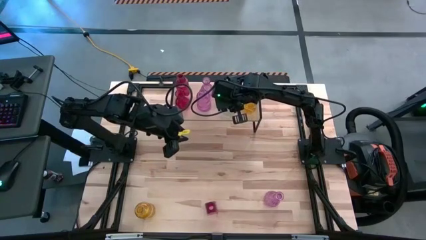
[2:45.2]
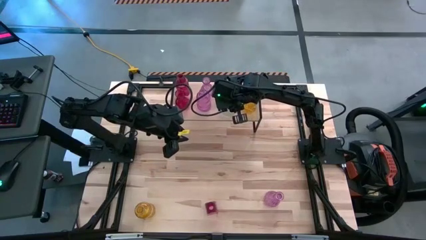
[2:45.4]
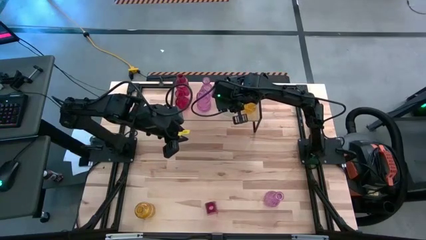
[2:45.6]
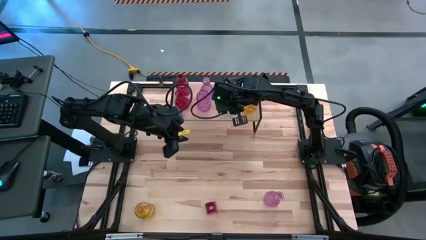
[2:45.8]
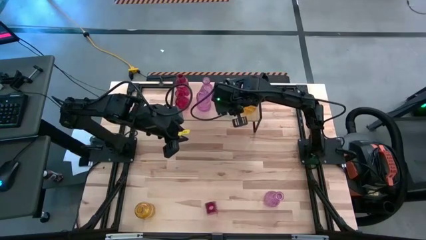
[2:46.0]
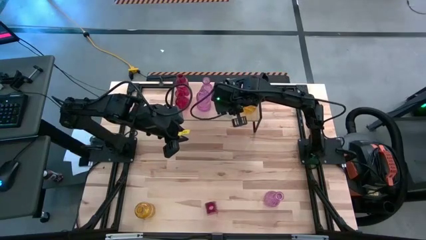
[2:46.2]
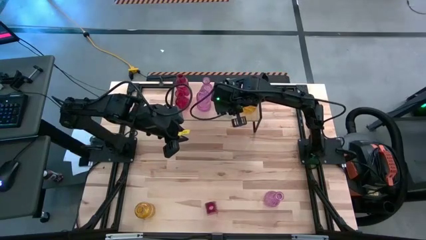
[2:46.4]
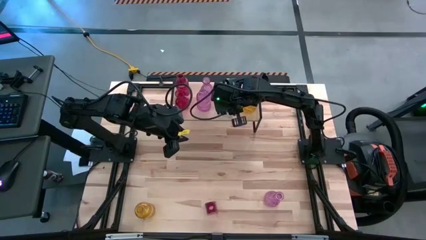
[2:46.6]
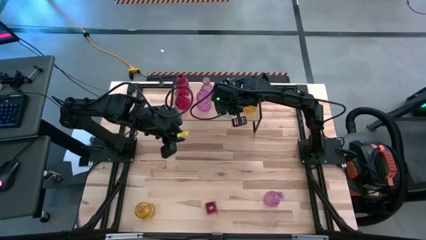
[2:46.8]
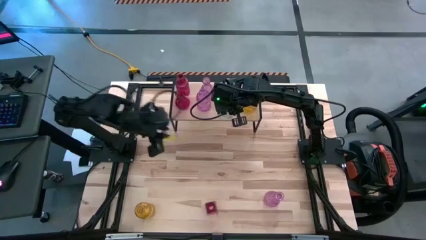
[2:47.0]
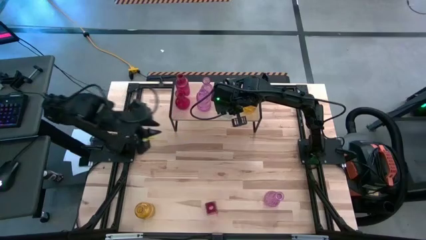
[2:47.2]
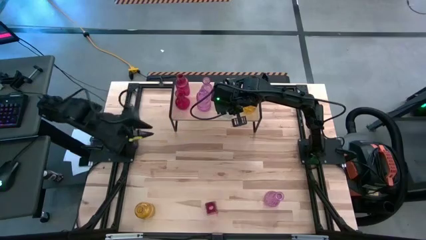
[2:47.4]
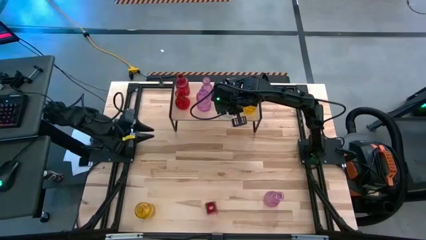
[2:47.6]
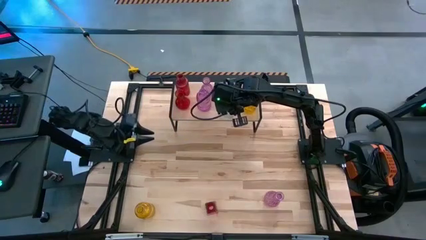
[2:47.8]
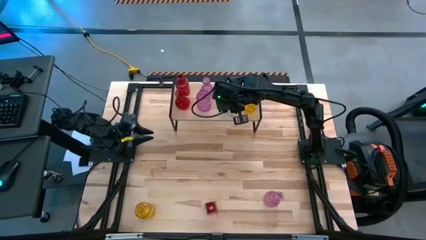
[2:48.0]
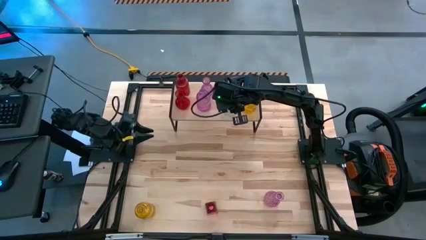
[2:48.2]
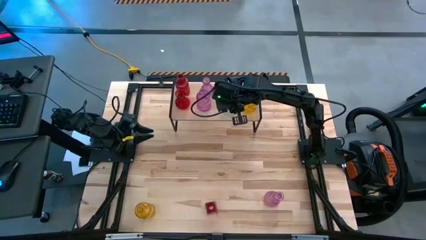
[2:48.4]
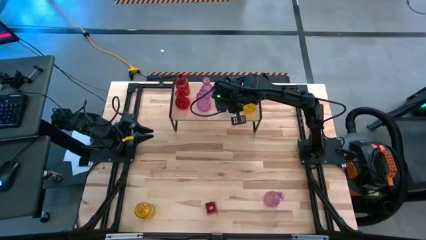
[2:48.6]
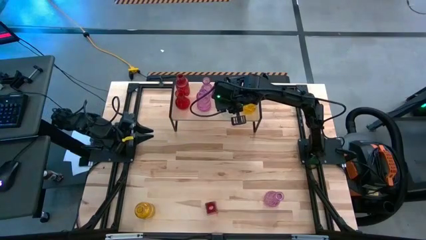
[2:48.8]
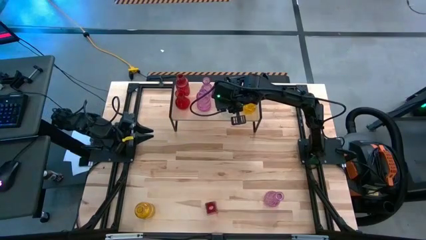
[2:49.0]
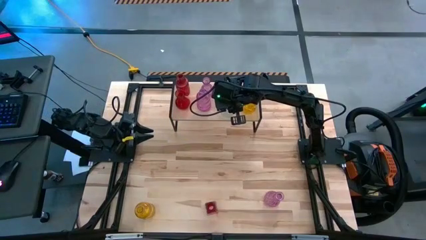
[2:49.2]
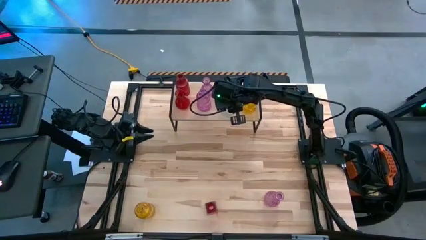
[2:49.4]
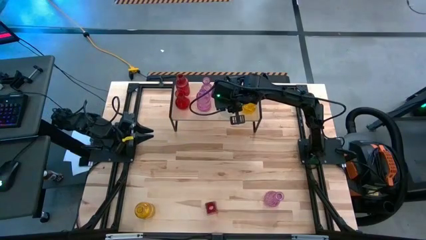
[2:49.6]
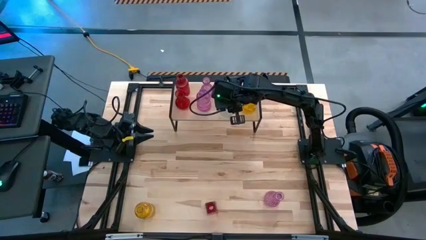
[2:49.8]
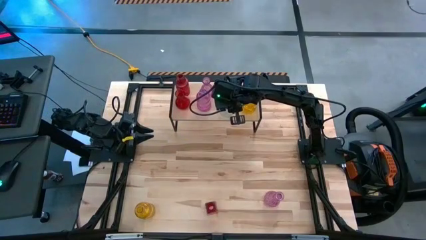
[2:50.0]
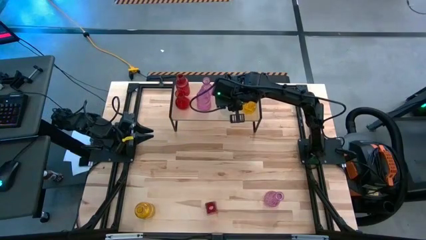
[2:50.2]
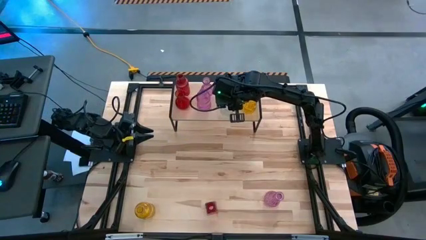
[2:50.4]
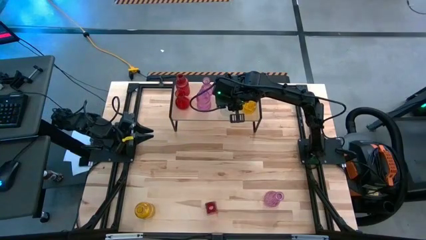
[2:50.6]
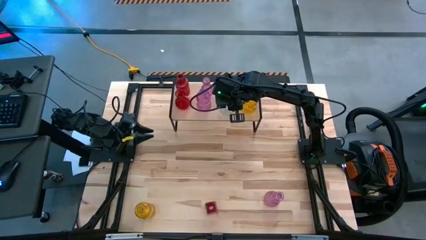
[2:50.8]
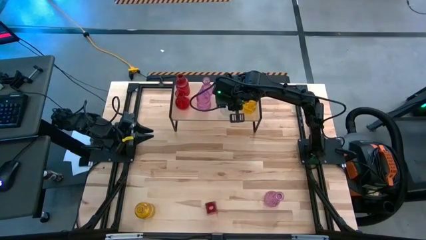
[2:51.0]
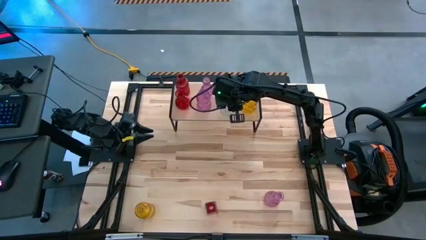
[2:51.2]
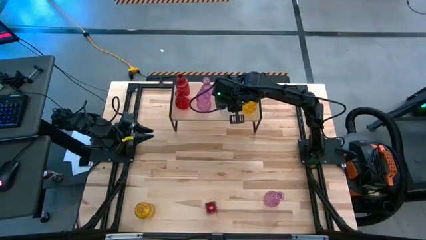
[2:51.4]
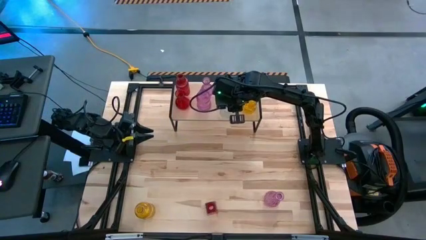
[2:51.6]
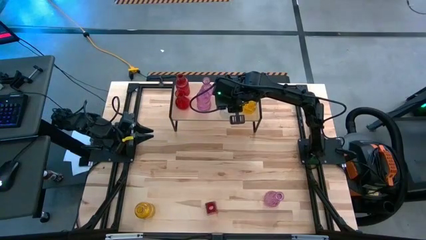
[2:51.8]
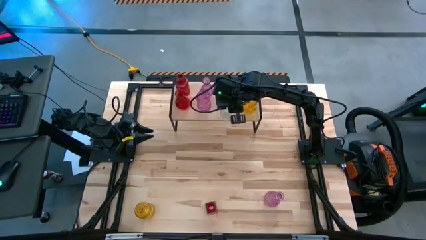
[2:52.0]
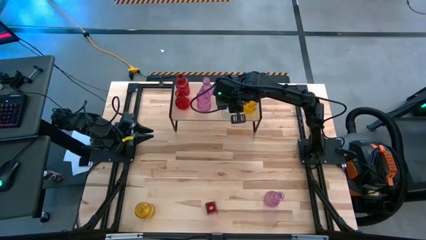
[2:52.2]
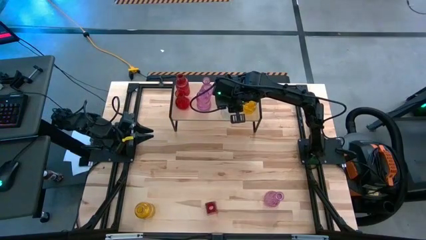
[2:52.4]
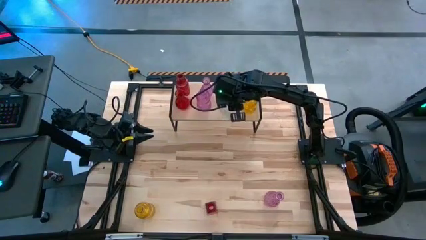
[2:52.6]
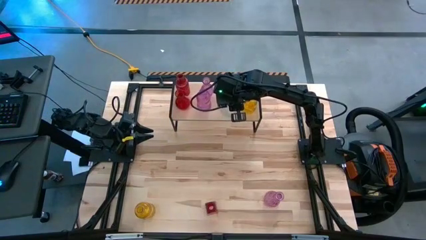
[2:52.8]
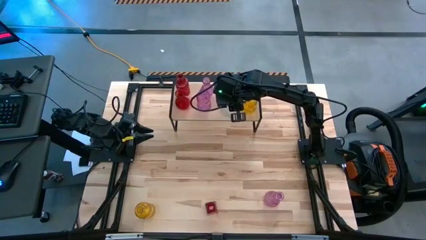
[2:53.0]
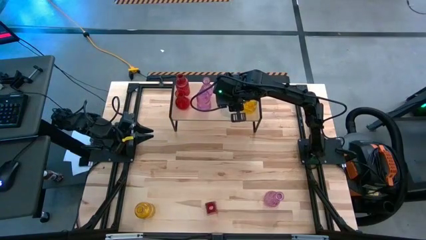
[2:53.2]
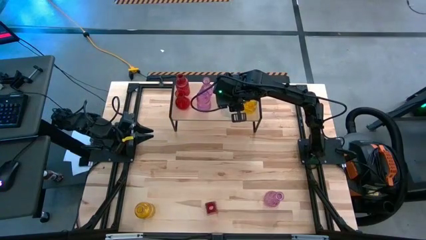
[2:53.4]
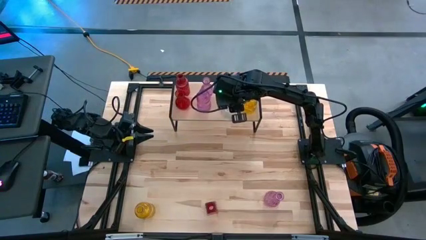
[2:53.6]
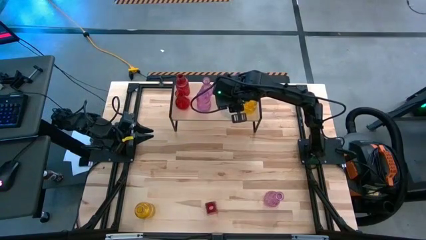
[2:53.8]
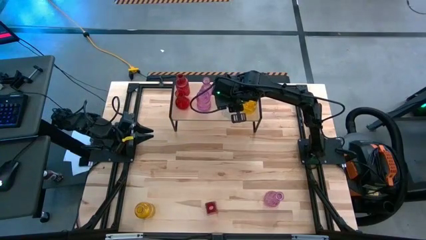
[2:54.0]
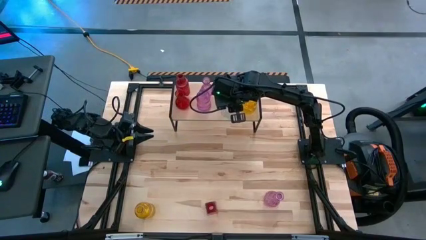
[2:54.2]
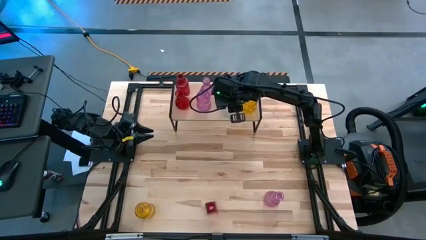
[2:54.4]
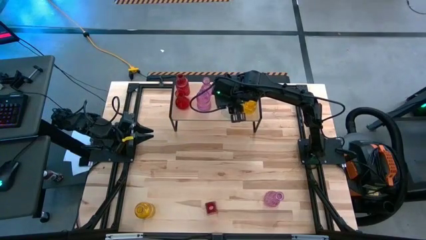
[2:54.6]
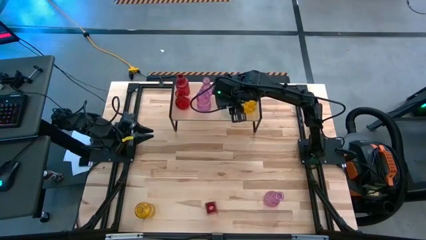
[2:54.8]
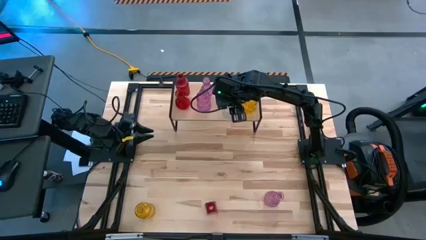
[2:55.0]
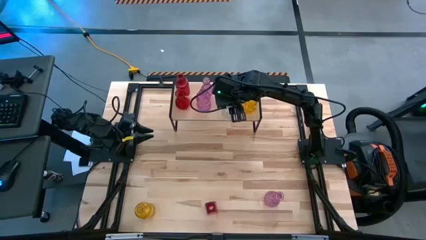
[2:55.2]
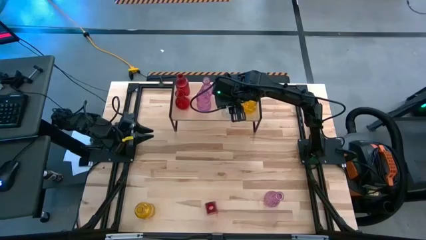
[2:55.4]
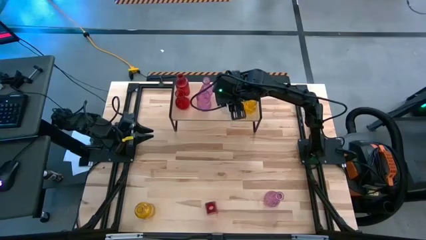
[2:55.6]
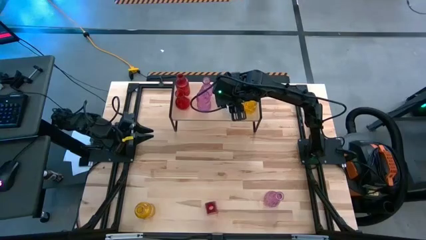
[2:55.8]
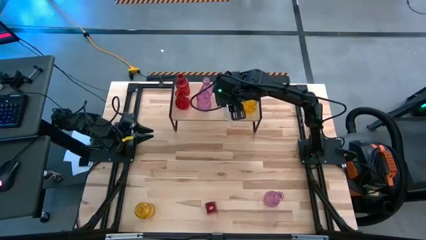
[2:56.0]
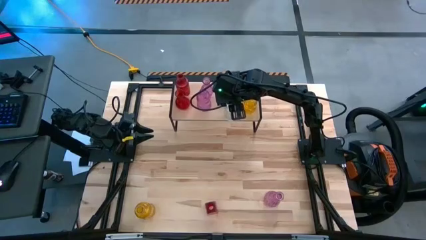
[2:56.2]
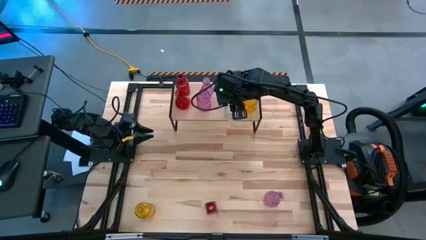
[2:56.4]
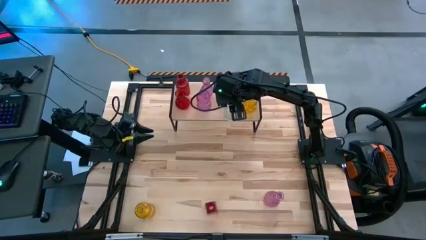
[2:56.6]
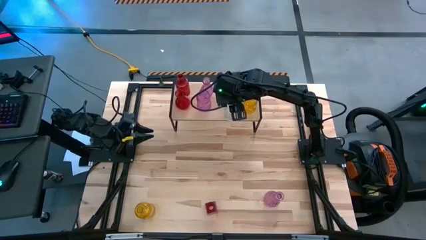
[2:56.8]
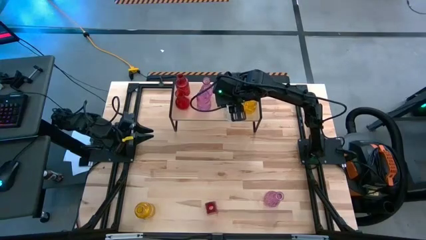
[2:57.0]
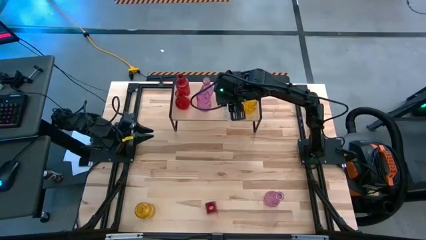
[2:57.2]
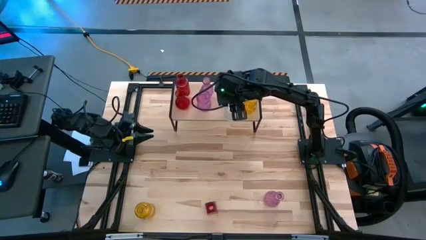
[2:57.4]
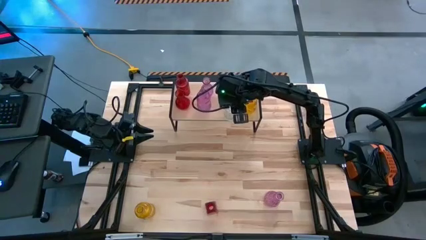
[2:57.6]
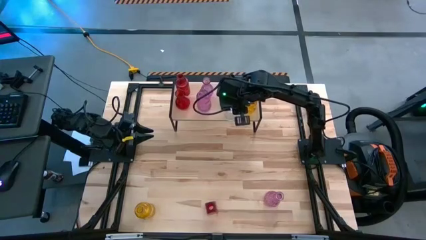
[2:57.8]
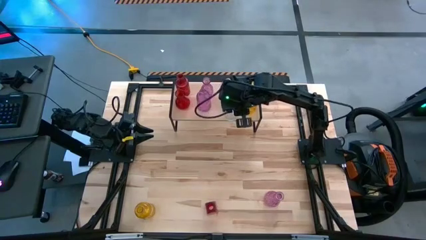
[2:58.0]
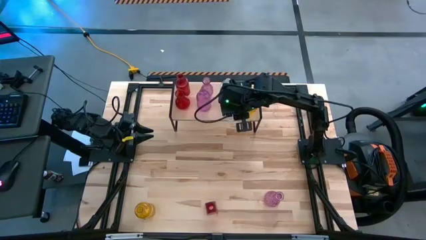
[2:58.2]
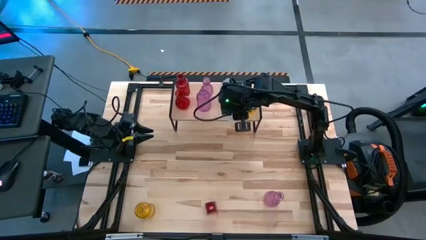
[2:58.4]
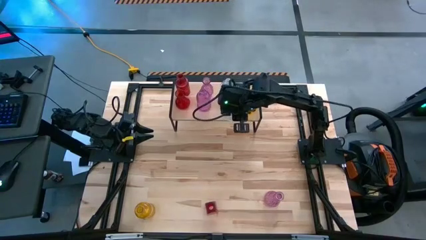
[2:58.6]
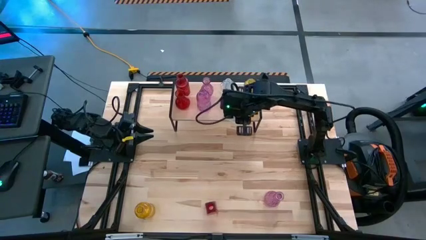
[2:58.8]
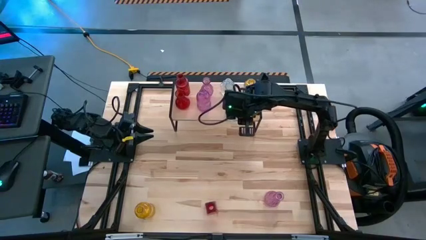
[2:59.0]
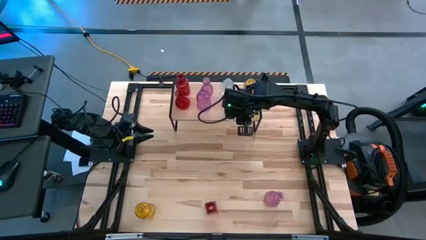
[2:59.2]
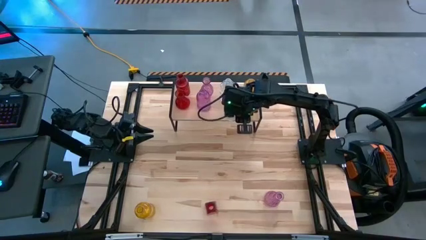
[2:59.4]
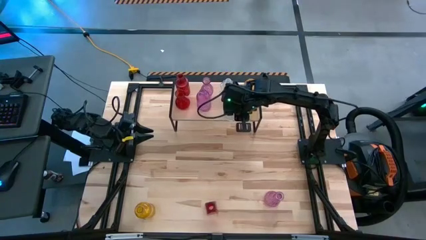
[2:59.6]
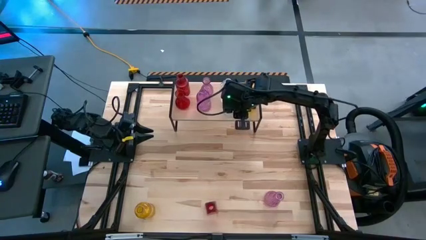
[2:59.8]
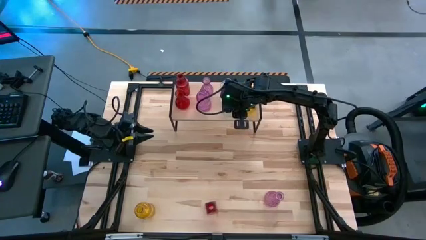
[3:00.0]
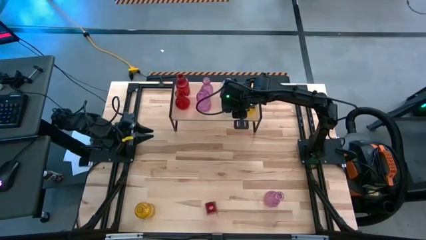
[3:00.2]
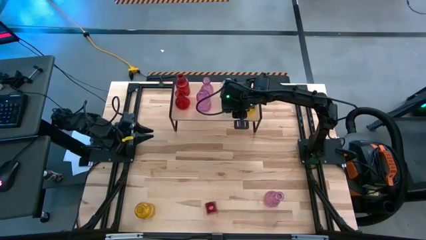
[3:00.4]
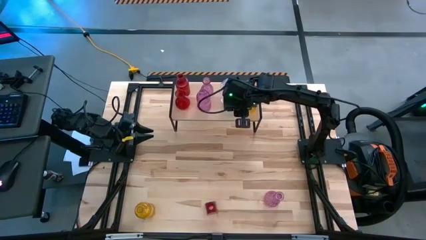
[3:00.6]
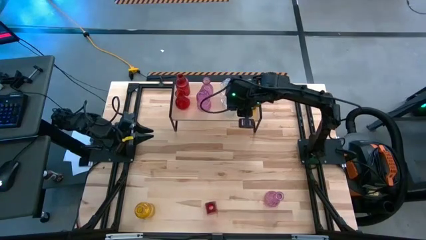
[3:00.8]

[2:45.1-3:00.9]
Task: sort vases onto shelf
Put the transparent vase on the shelf aligned with the other transparent vases
